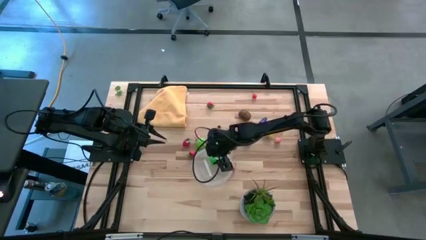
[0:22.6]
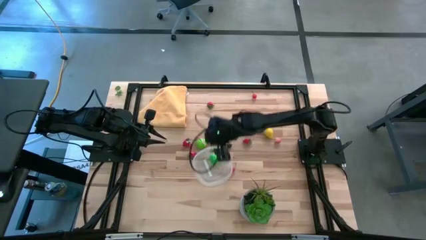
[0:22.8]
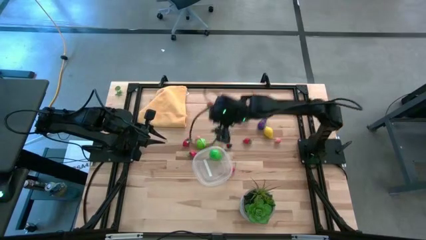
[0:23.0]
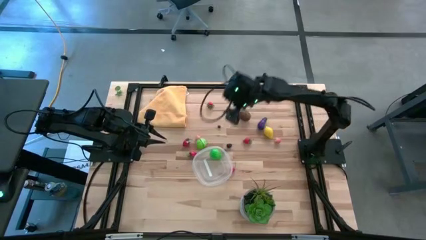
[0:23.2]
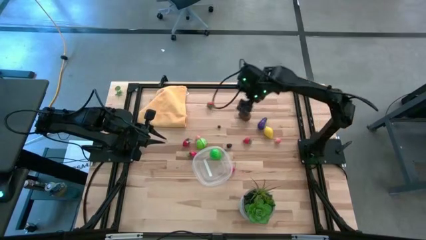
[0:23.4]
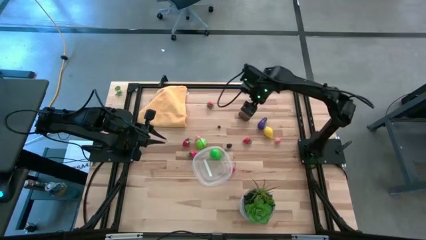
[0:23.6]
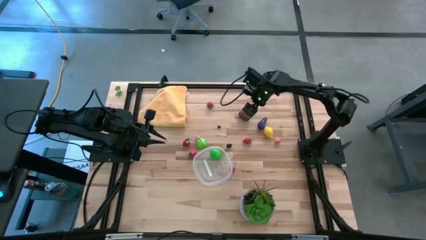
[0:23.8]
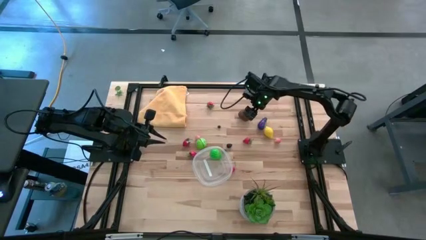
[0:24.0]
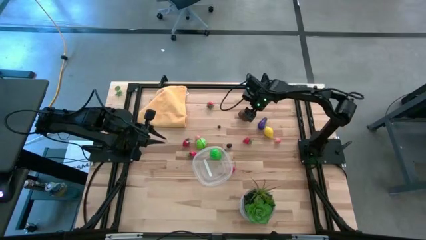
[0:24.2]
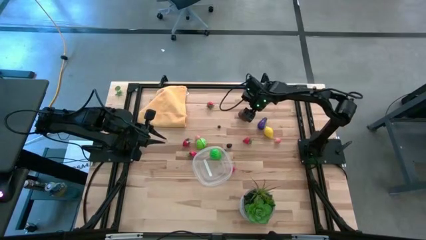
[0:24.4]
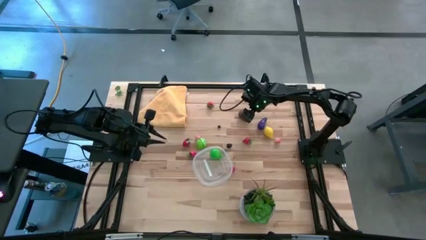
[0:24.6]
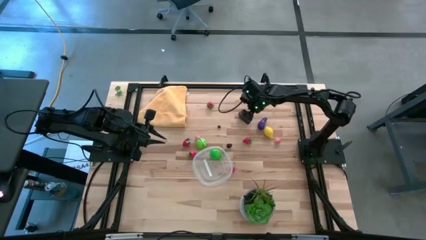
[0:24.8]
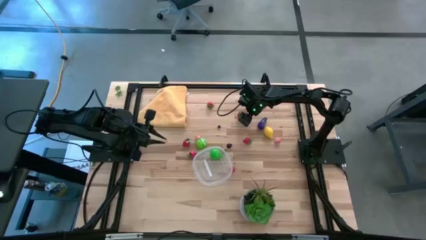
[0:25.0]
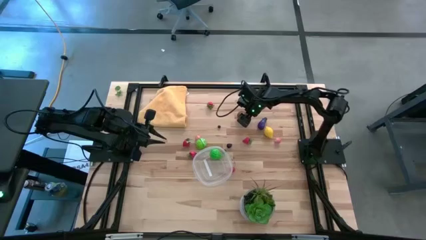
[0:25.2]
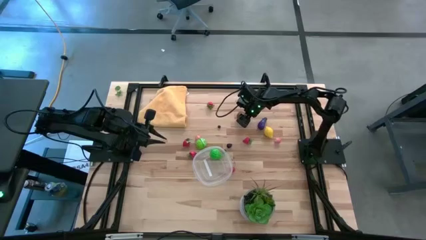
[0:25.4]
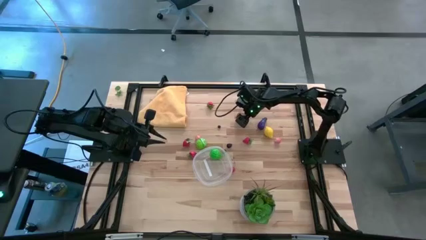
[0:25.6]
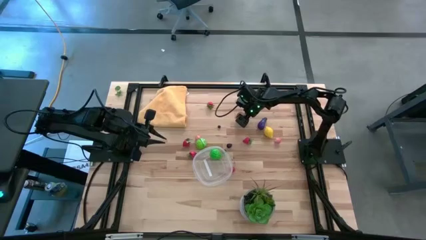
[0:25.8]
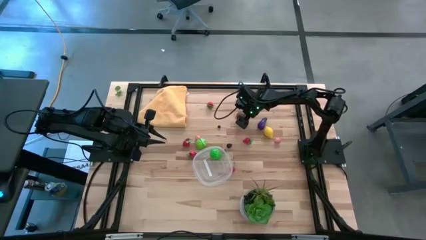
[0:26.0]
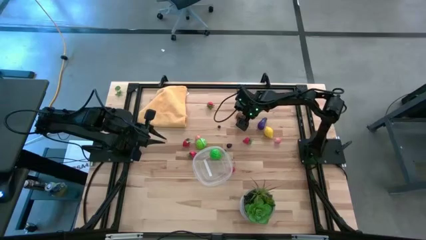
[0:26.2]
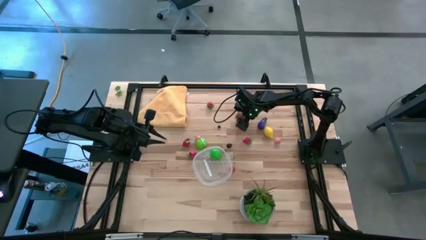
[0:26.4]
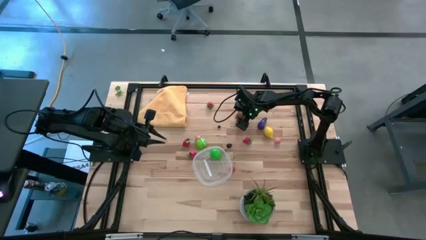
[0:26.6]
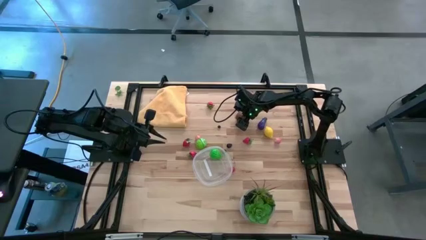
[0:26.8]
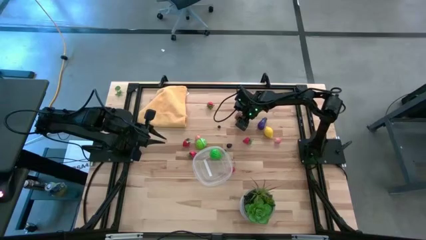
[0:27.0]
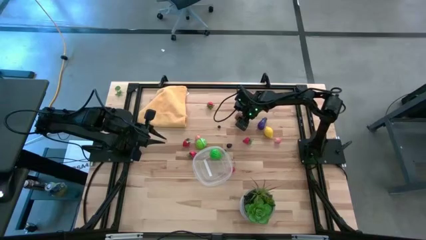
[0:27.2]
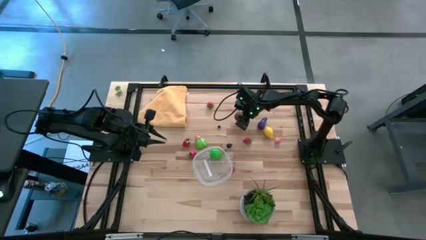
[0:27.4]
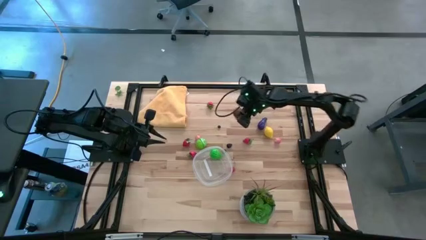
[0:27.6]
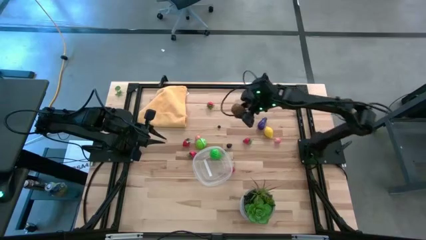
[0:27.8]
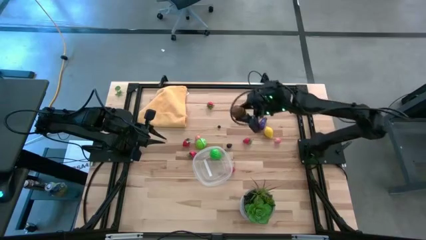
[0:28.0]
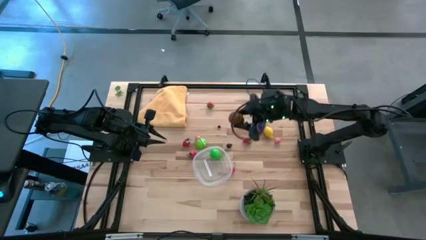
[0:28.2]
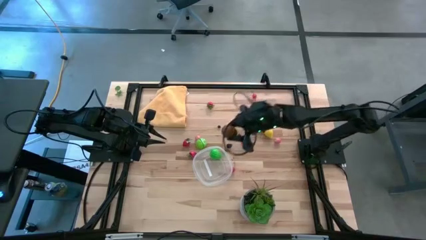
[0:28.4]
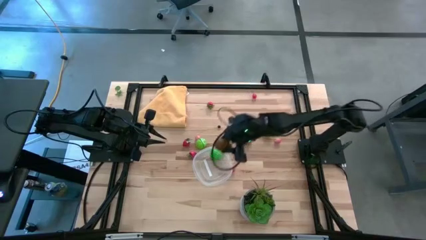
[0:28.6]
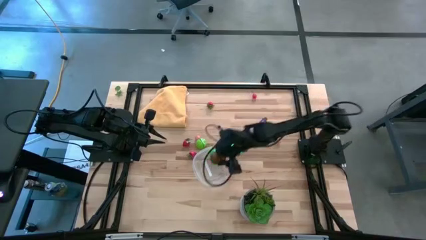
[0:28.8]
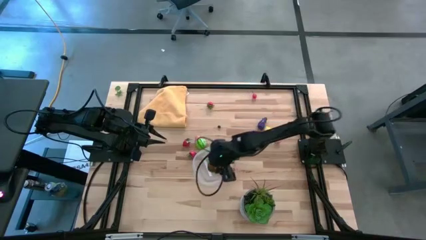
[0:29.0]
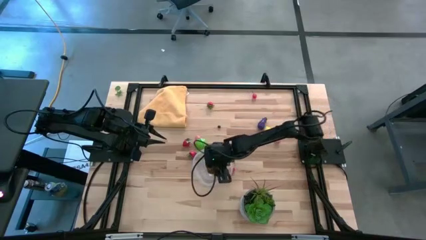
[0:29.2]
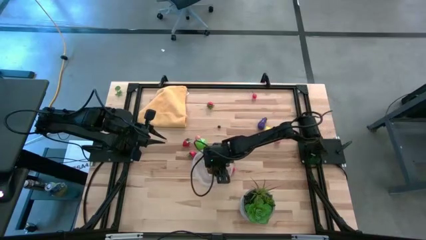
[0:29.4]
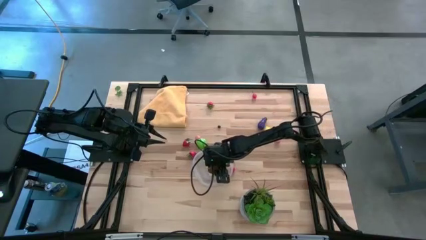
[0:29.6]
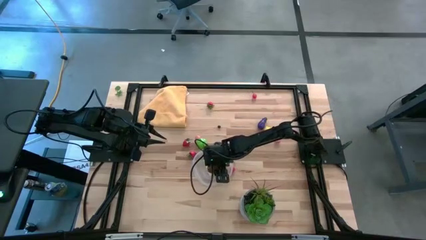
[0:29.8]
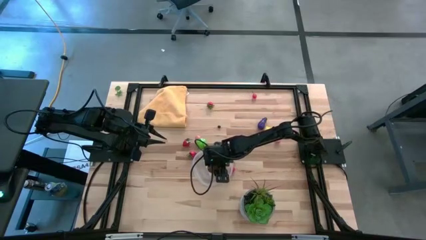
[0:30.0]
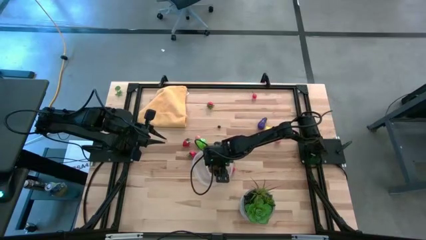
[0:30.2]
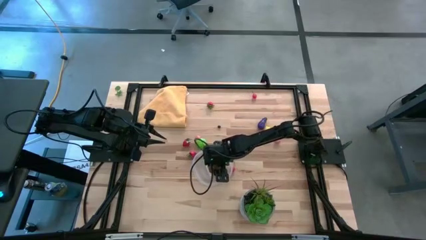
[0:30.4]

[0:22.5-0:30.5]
Task: Pick and placing Produce into tupperware
Put the brown kiwi into the transparent bin

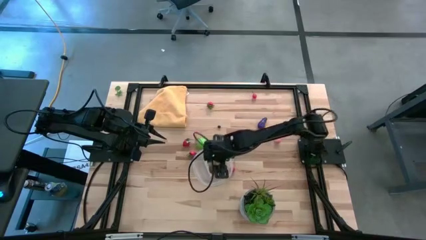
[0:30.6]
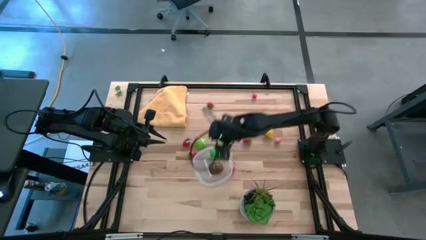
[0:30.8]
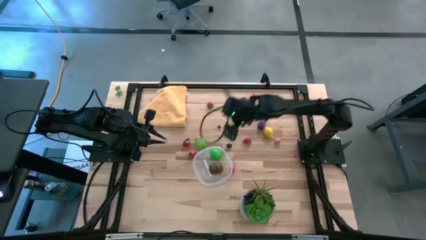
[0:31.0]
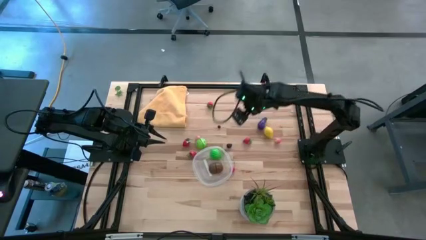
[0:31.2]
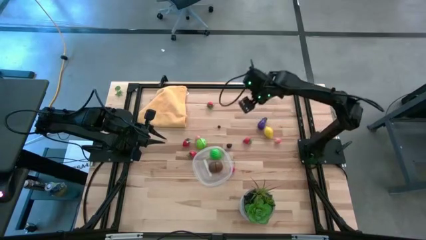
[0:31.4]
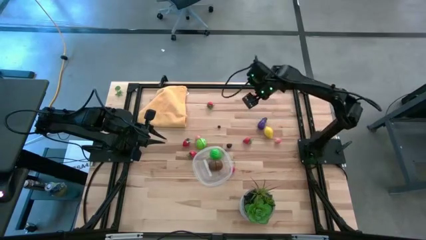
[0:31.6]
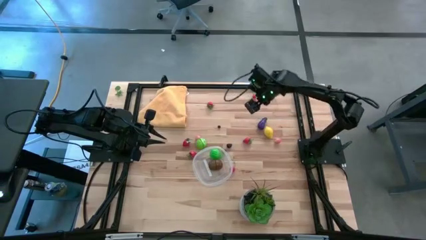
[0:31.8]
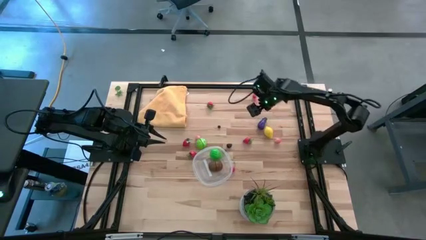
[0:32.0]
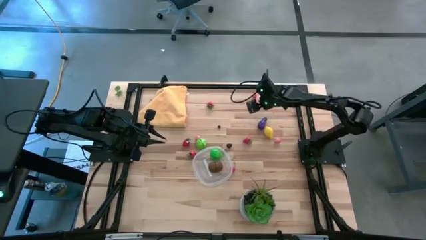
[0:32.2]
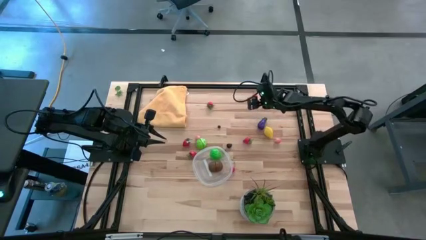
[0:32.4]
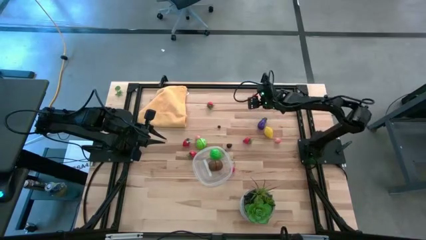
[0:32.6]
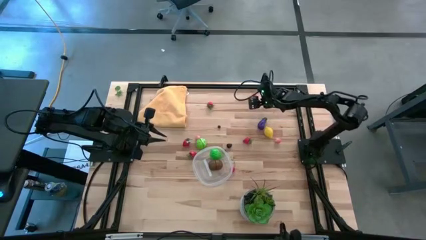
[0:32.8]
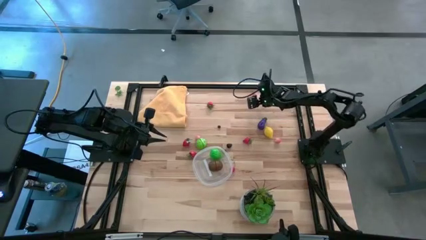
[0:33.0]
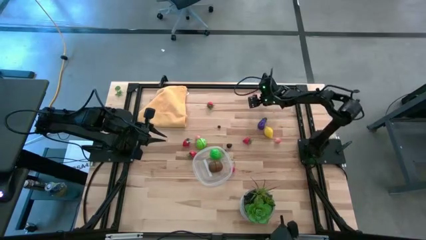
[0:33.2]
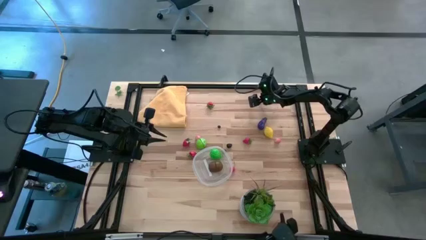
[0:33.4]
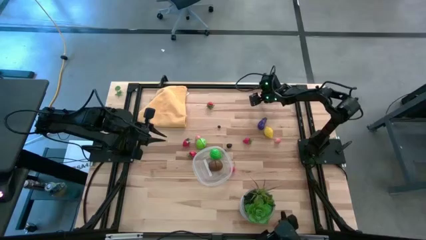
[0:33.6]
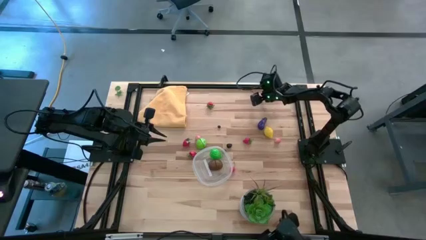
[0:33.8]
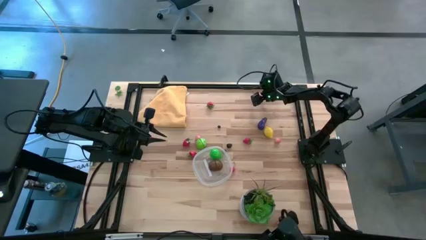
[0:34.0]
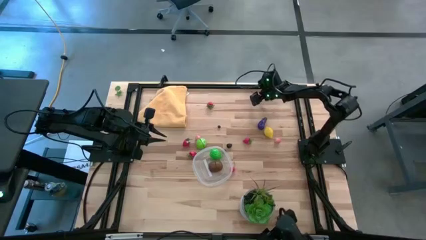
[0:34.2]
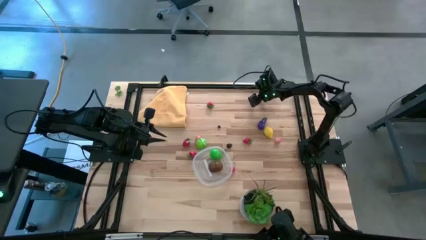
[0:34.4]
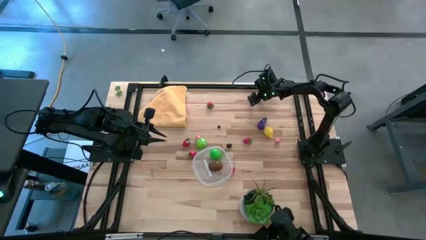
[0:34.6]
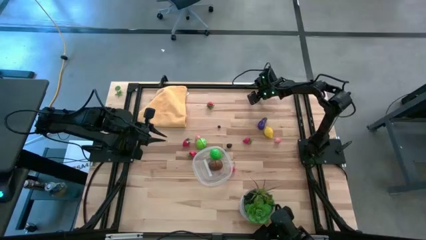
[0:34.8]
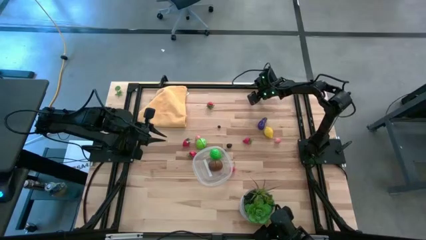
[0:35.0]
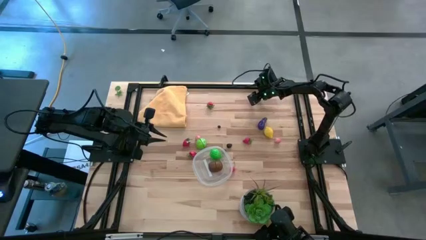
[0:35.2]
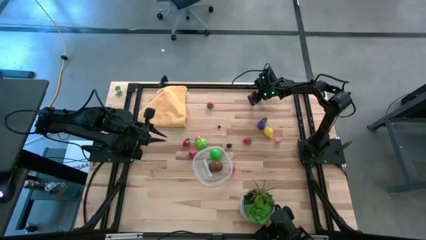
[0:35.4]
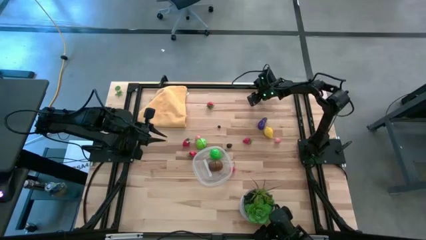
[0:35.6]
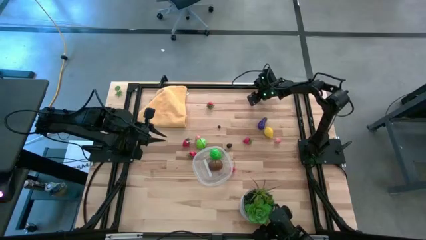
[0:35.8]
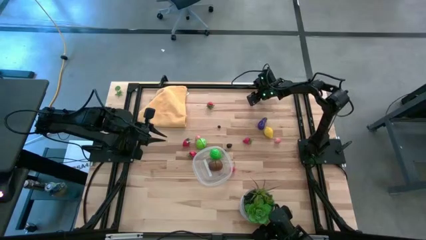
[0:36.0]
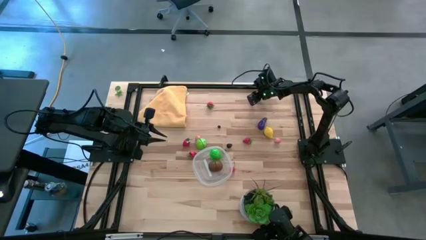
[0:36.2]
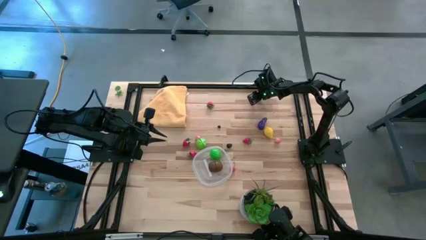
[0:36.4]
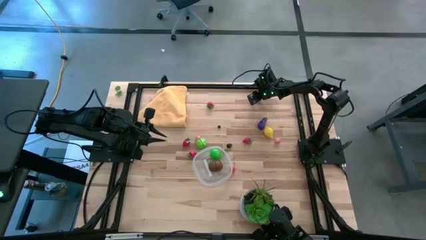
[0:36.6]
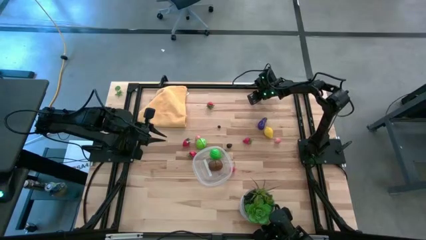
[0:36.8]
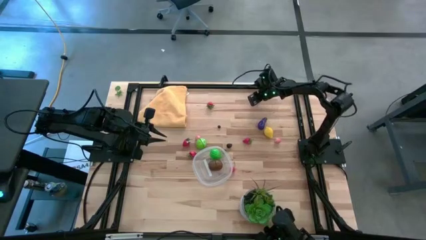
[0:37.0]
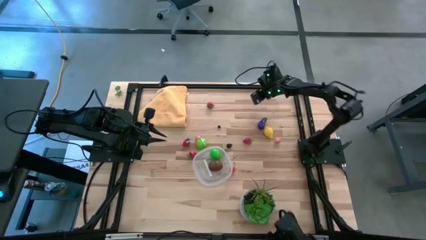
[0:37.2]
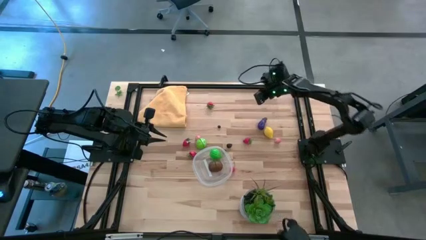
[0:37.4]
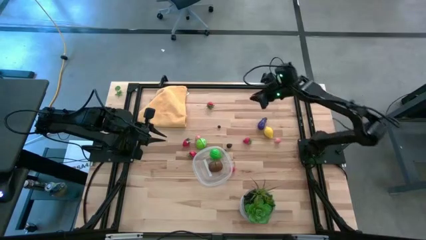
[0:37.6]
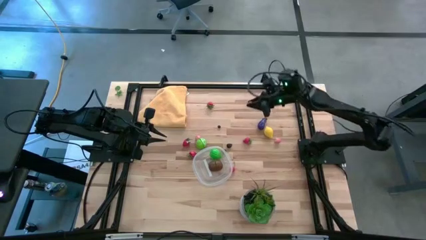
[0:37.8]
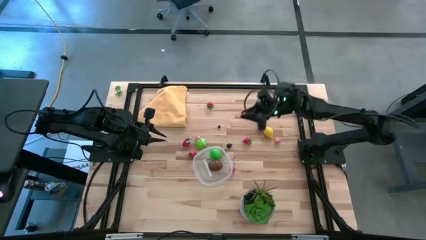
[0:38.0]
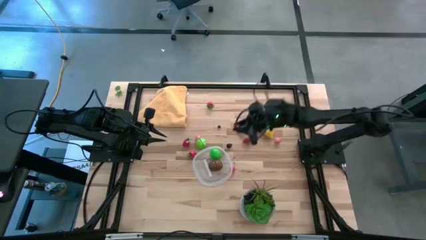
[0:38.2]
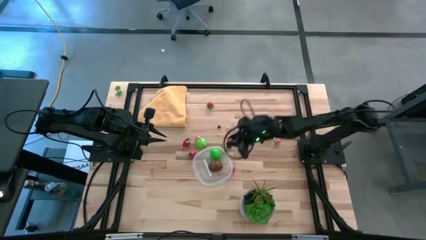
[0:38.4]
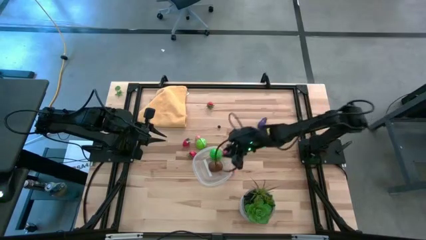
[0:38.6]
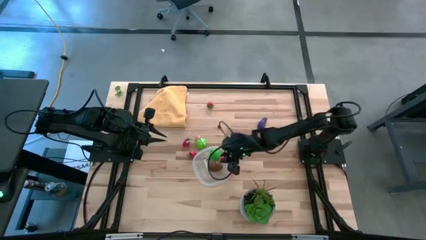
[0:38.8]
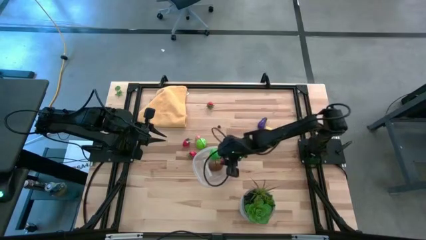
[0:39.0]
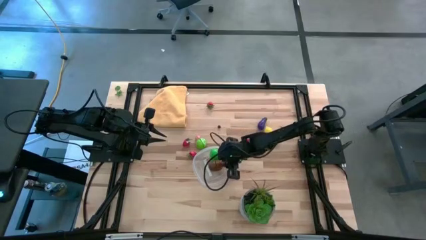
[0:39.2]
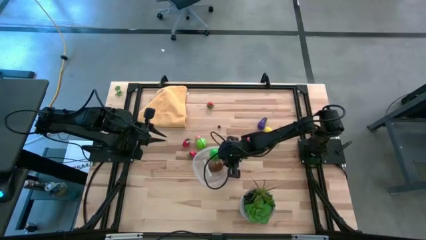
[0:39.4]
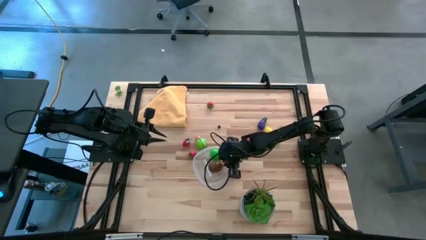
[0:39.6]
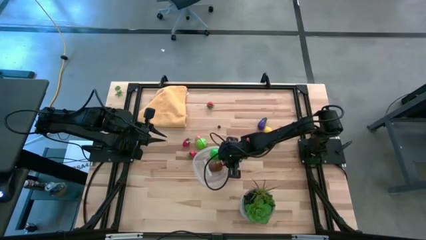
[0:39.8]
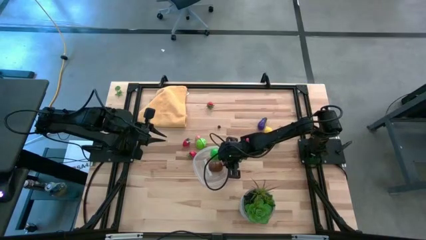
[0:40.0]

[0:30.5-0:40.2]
Put the red cherry into the transparent bin
